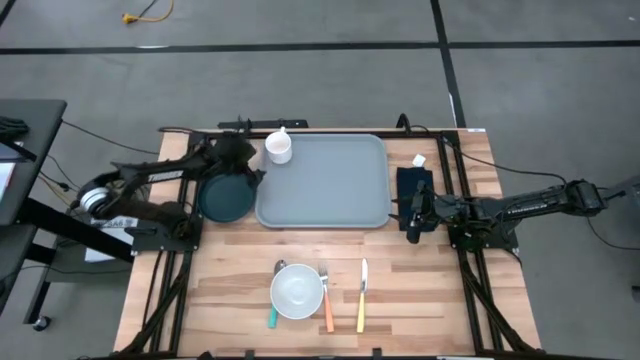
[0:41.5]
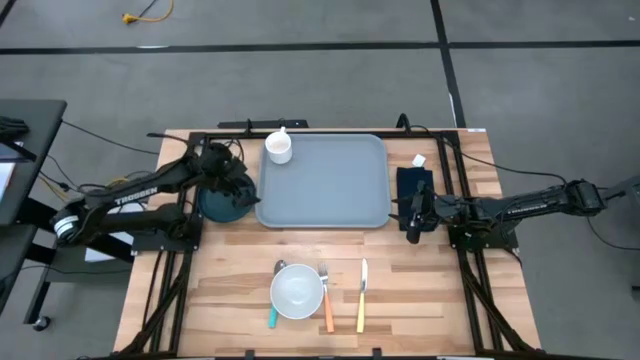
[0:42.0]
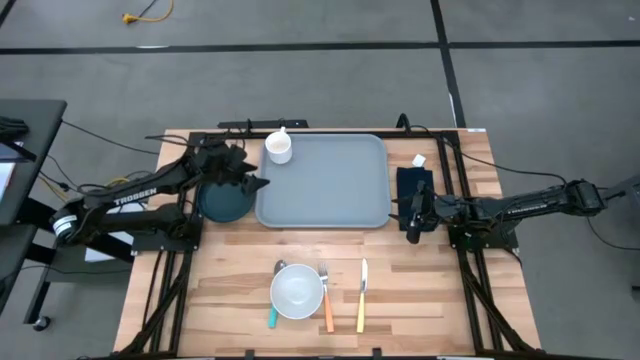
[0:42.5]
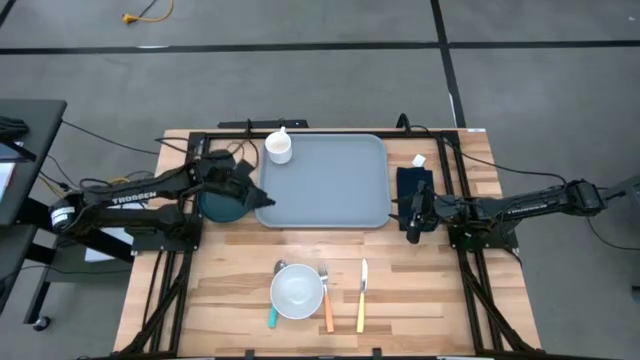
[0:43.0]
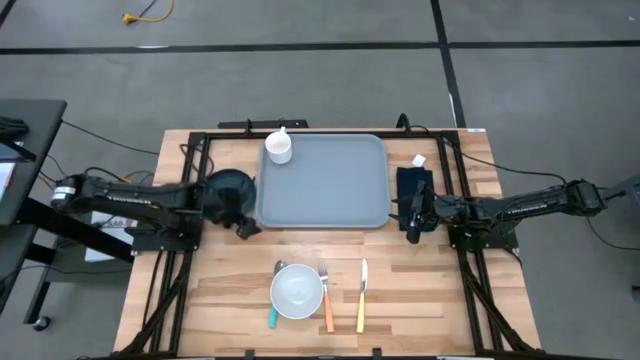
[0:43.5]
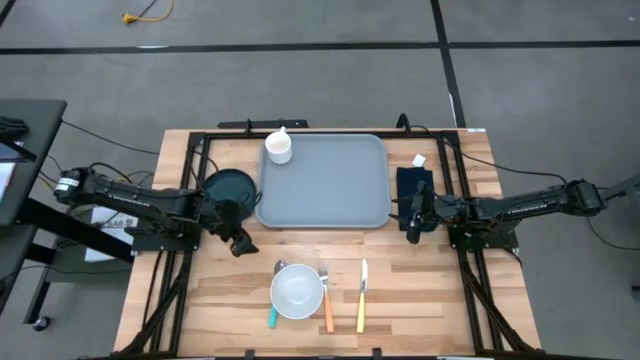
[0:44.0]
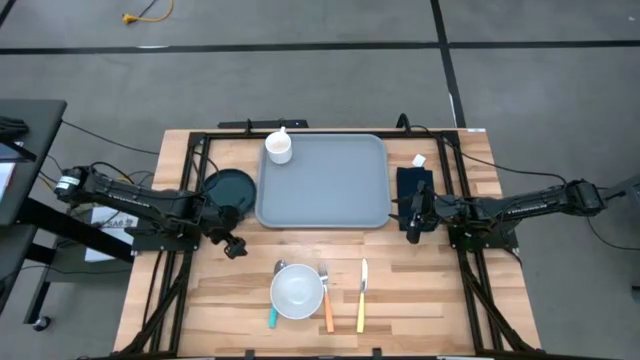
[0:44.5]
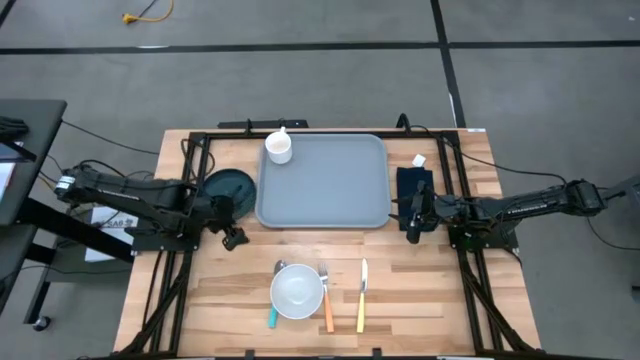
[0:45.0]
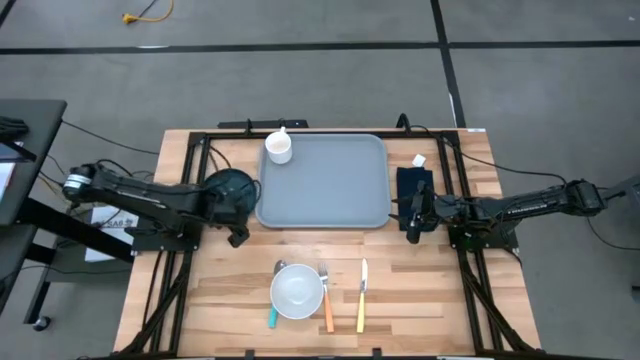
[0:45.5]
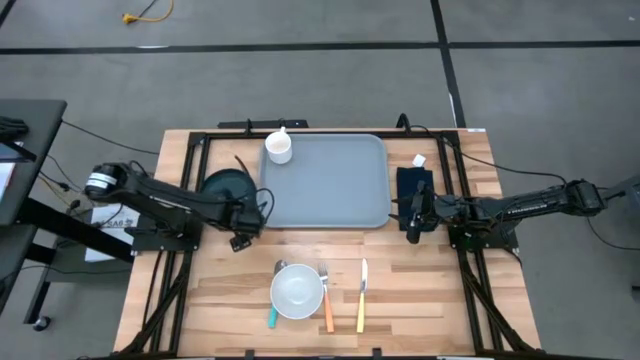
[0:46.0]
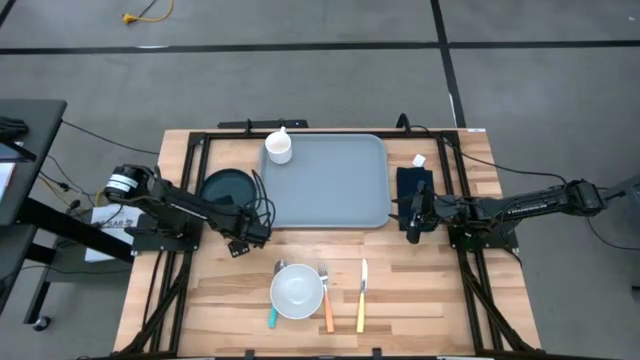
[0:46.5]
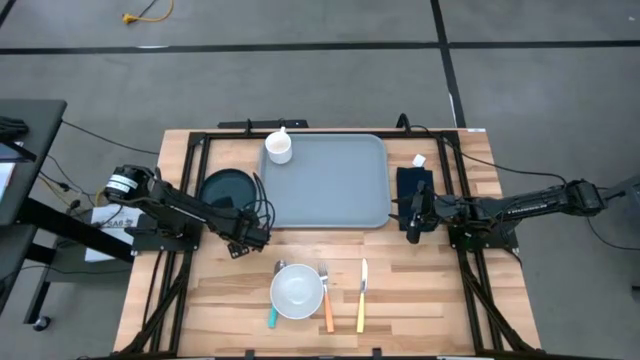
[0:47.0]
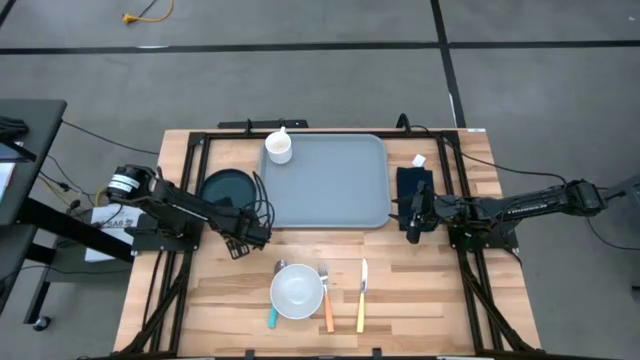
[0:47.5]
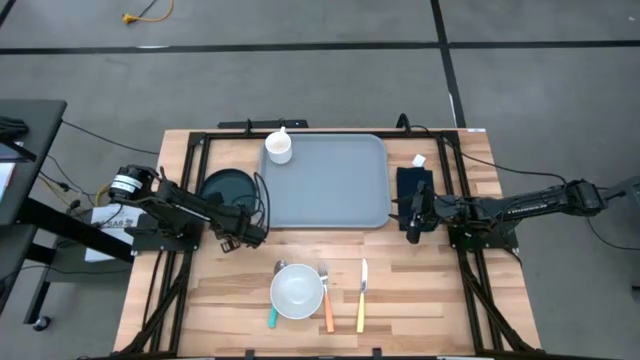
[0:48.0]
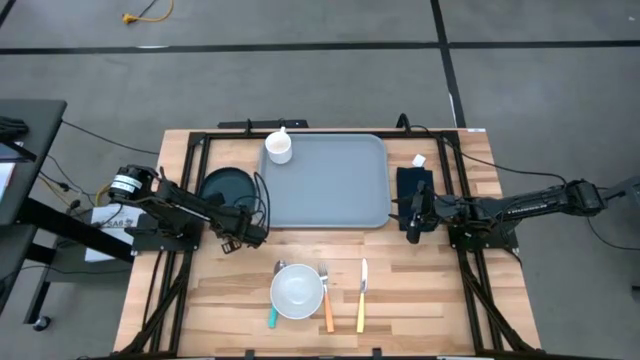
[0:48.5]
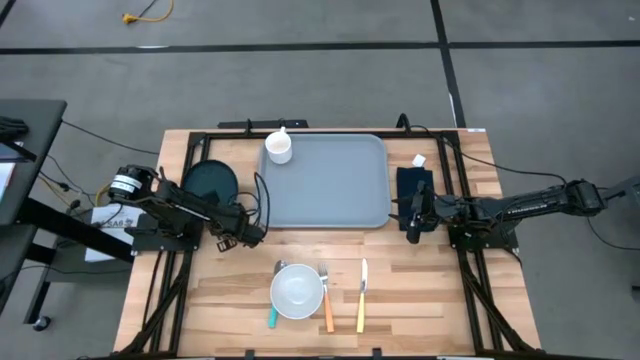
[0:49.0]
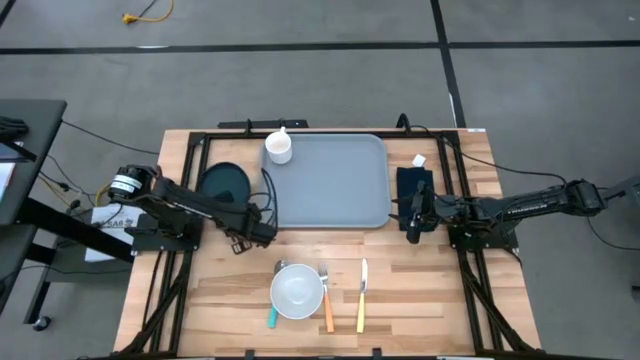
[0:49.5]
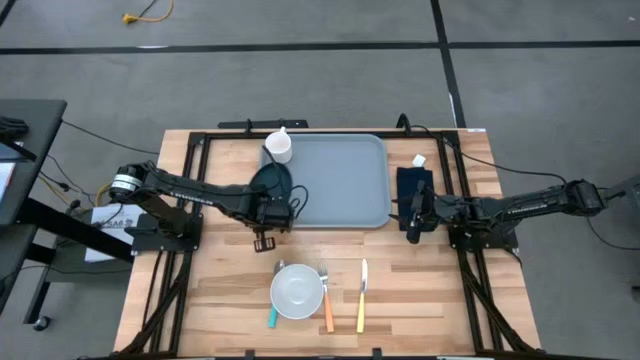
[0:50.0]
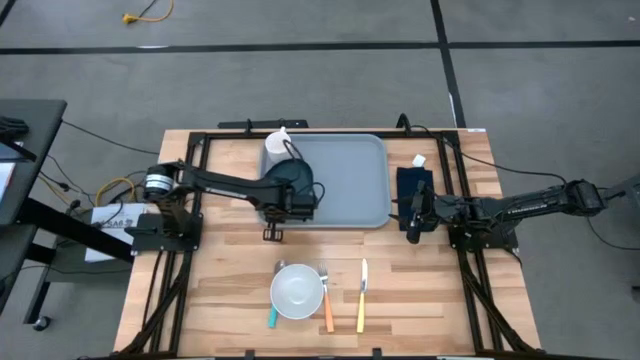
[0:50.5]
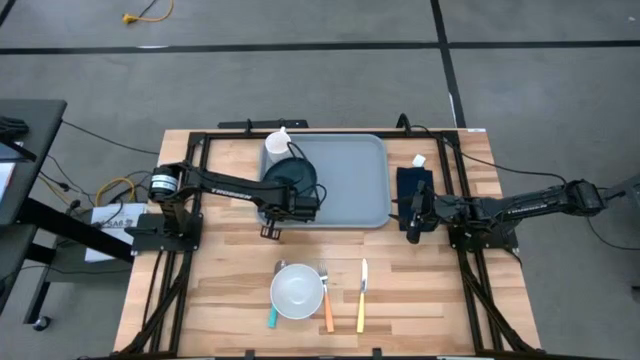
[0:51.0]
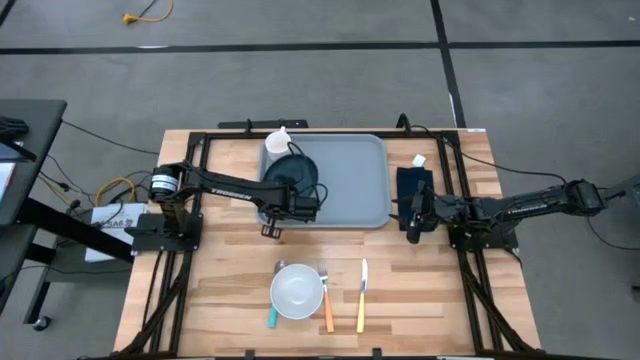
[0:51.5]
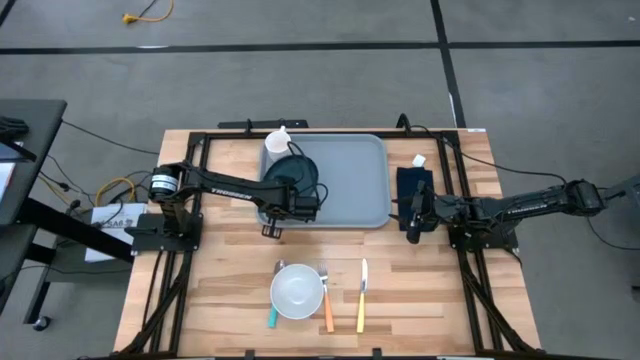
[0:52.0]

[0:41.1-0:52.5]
Task: Set up tray
Put the black plate on the gray serving tray below the white mug

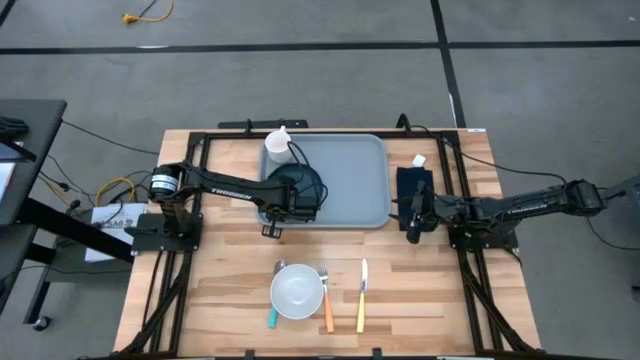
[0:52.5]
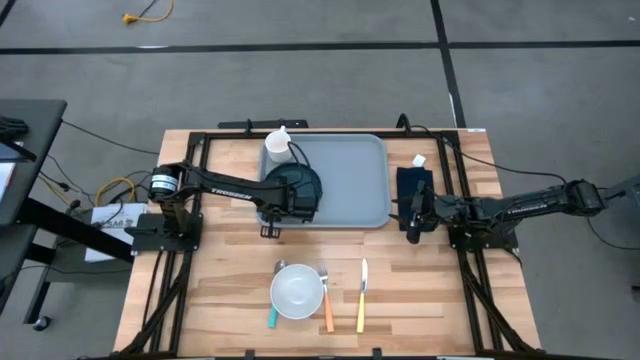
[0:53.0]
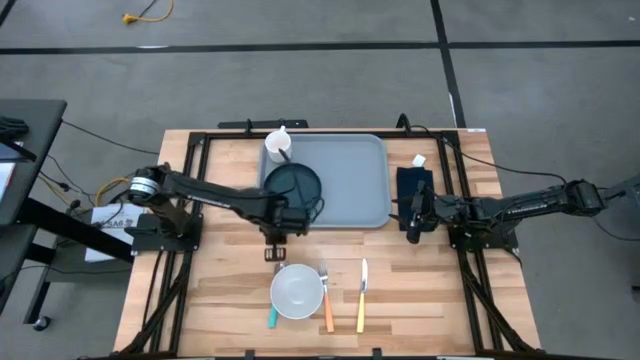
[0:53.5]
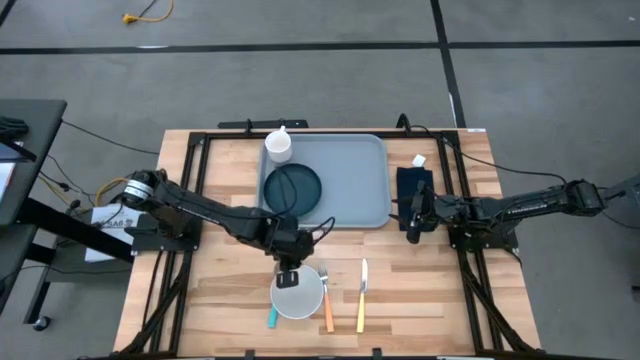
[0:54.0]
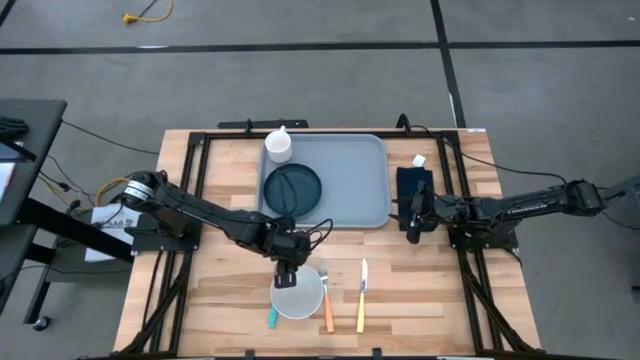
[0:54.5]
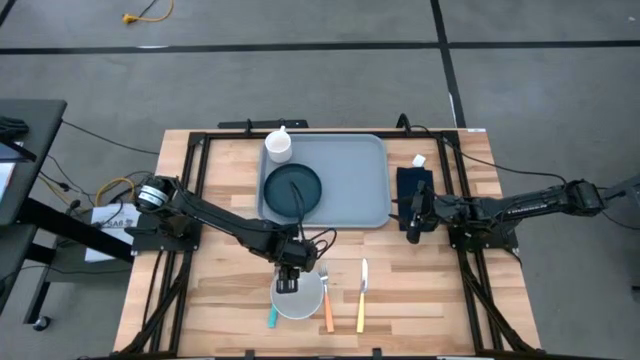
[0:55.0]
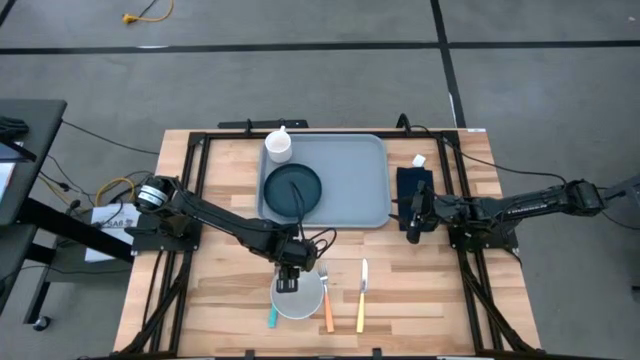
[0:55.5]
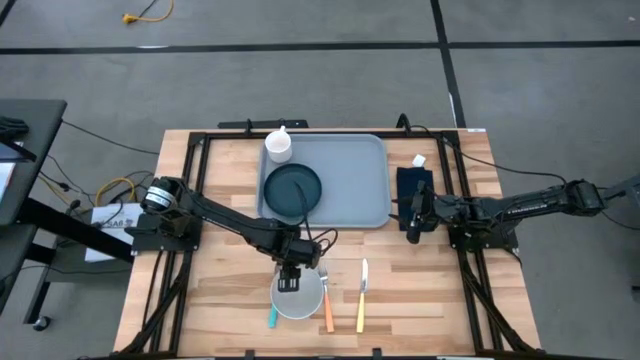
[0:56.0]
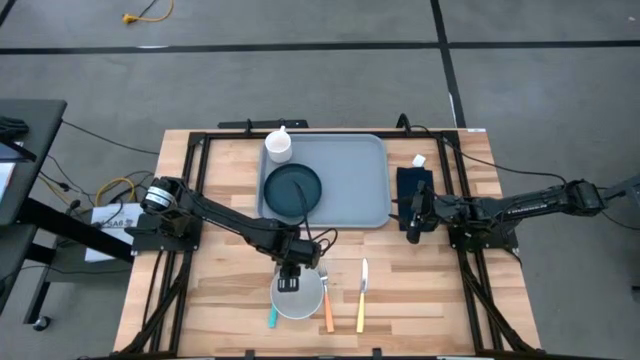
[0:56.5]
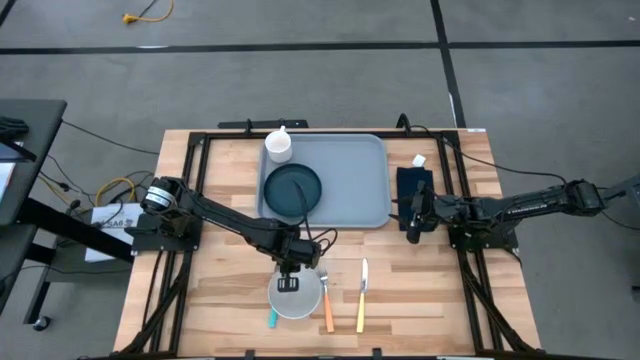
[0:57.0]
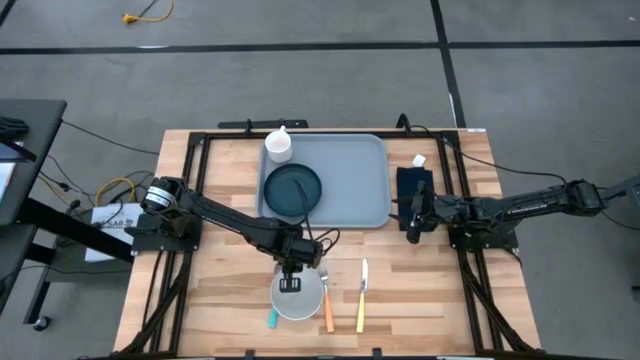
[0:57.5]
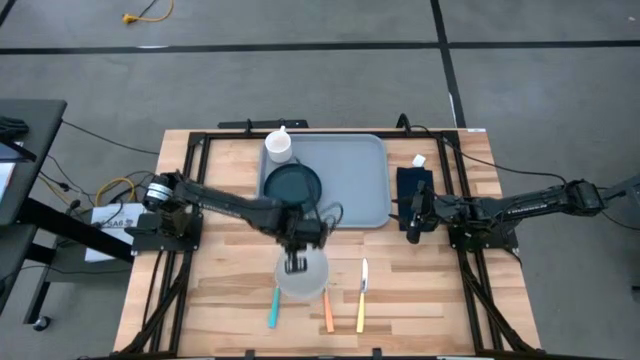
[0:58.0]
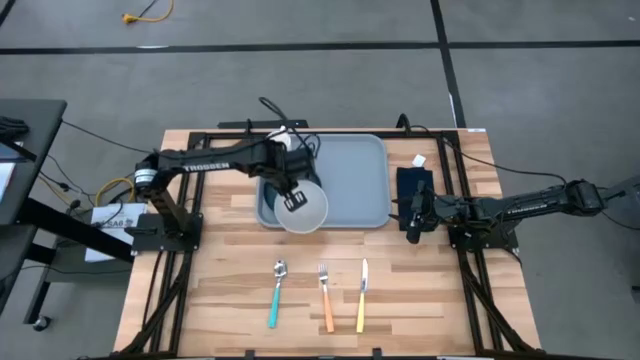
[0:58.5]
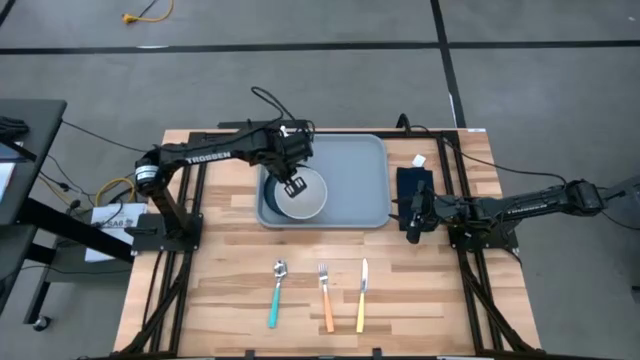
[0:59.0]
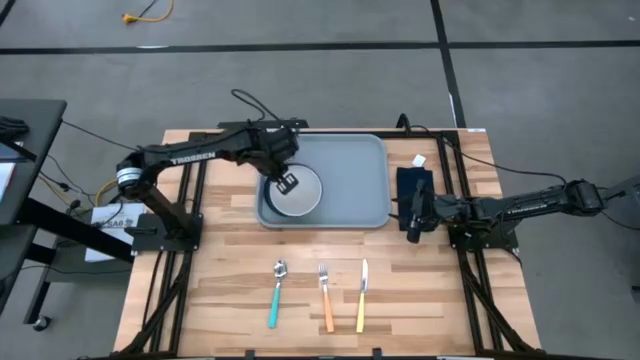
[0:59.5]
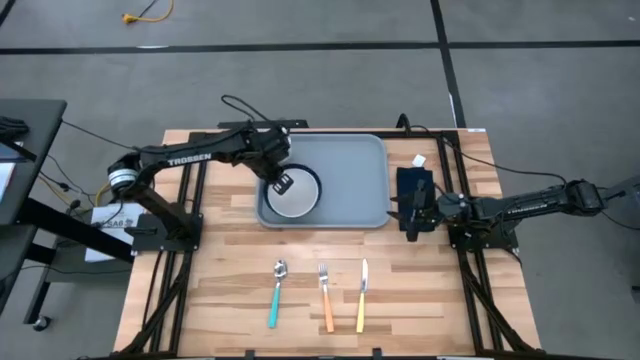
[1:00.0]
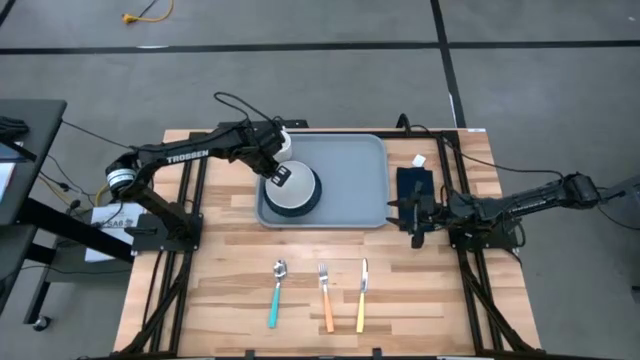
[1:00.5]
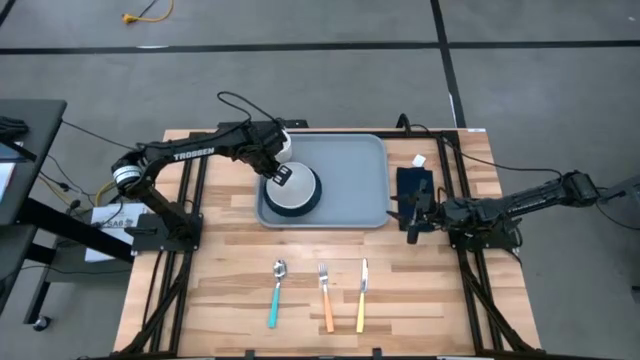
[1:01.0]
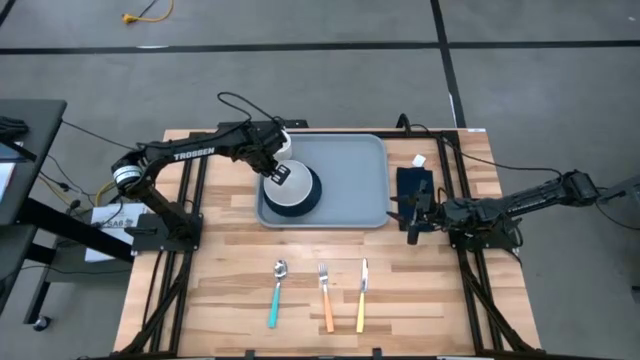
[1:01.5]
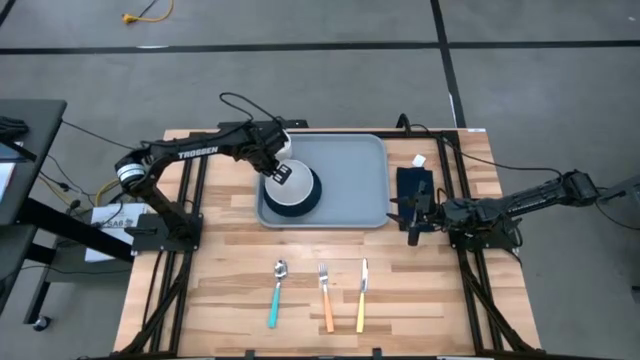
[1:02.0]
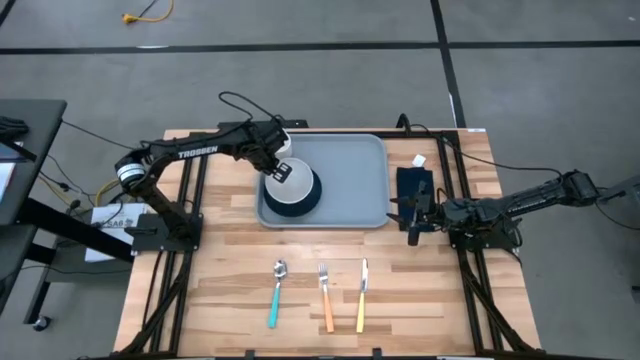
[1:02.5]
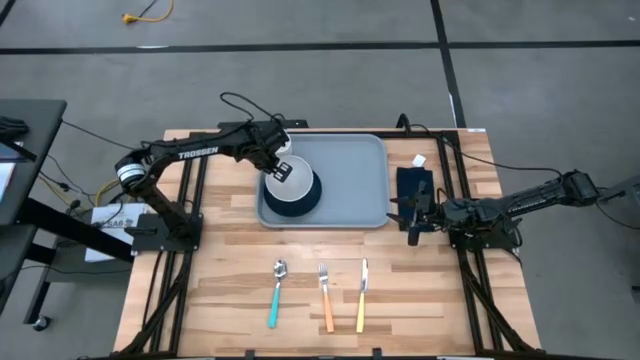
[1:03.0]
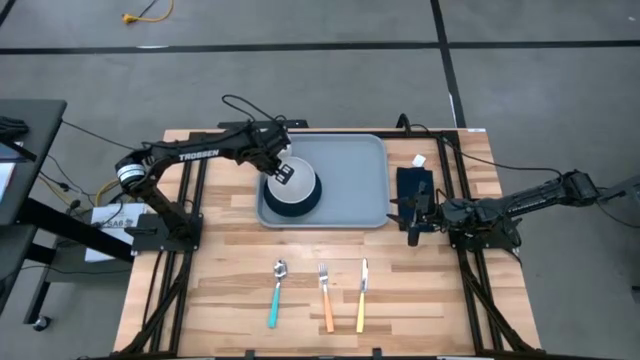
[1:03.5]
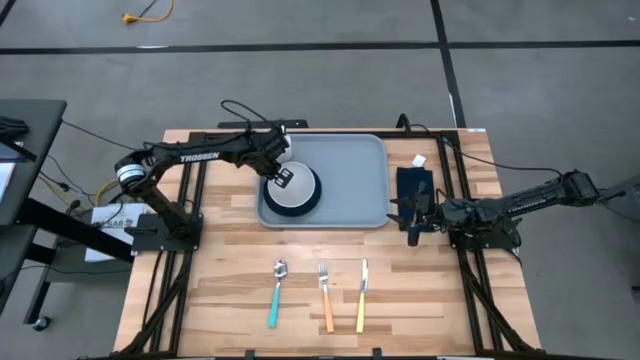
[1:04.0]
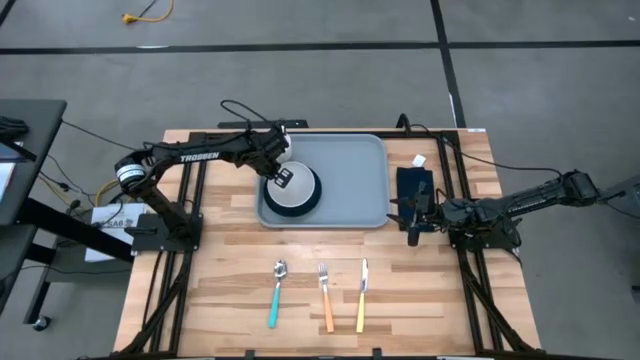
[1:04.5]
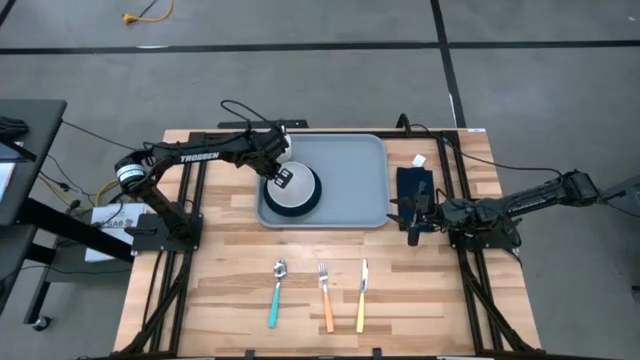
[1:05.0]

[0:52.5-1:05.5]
Put the white bowl on the black plate on the gray serving tray
